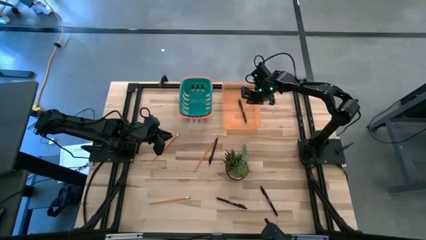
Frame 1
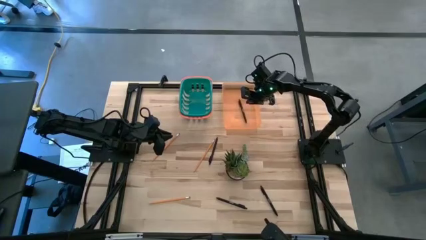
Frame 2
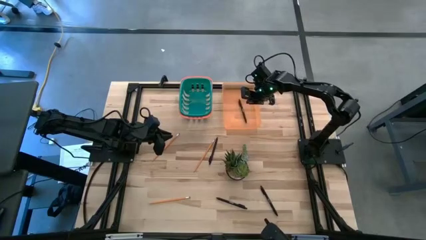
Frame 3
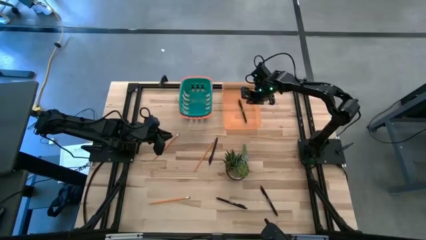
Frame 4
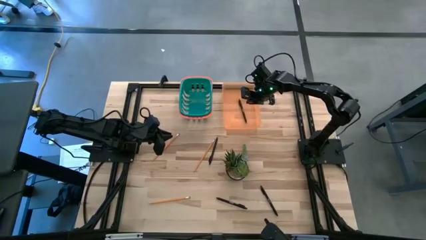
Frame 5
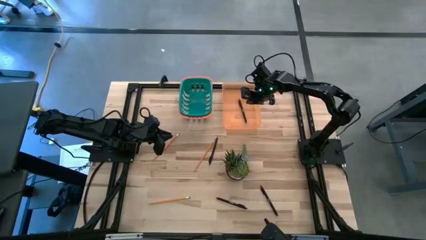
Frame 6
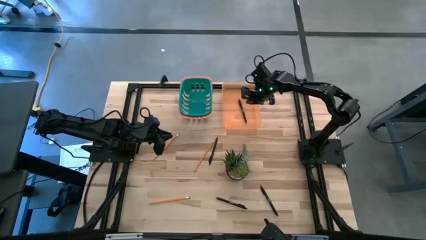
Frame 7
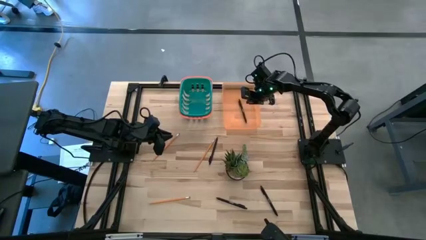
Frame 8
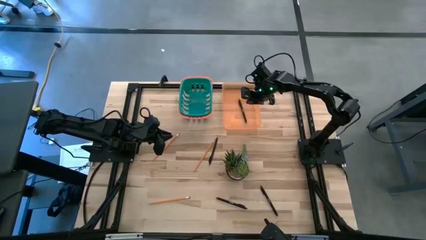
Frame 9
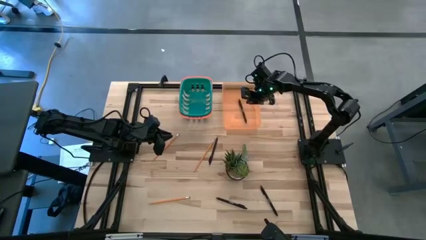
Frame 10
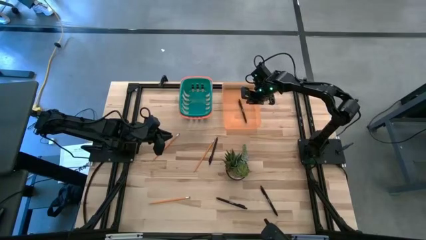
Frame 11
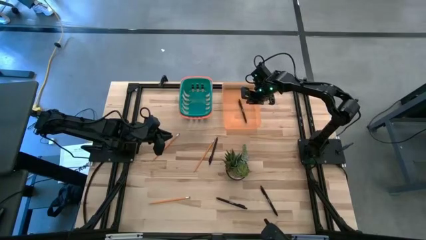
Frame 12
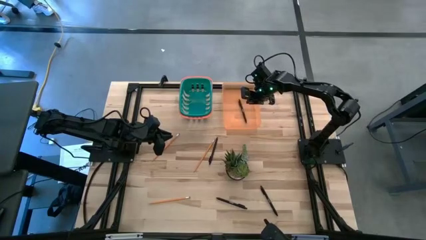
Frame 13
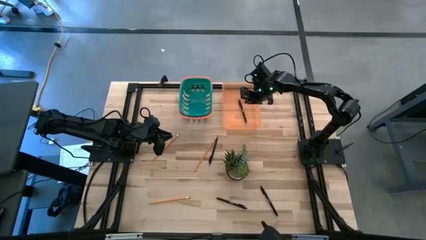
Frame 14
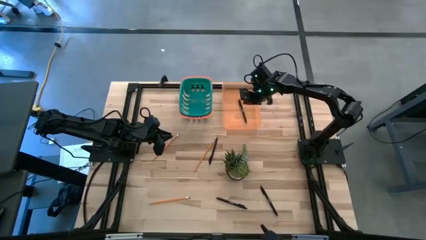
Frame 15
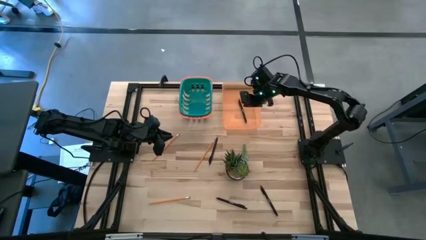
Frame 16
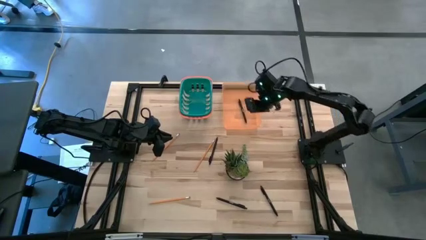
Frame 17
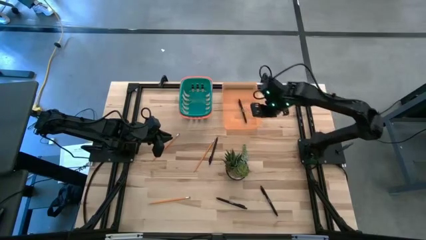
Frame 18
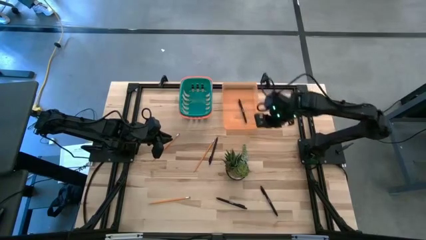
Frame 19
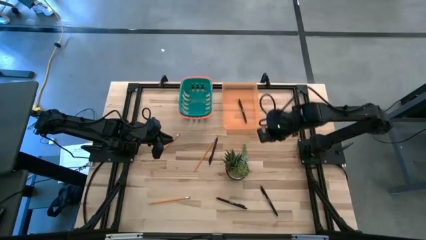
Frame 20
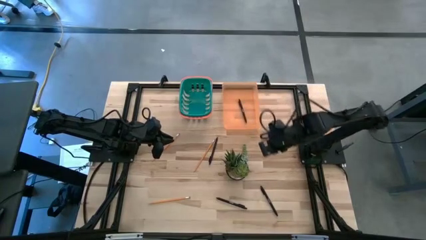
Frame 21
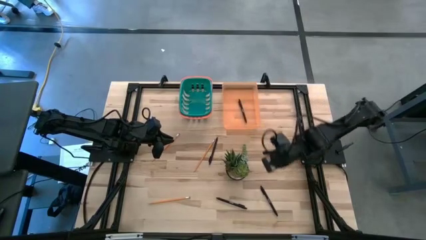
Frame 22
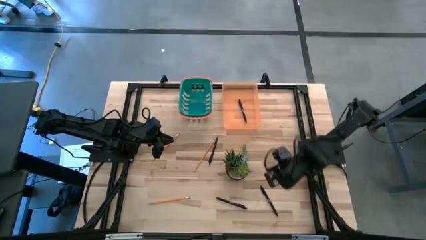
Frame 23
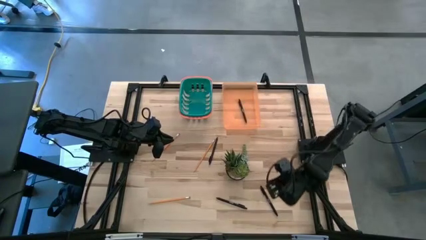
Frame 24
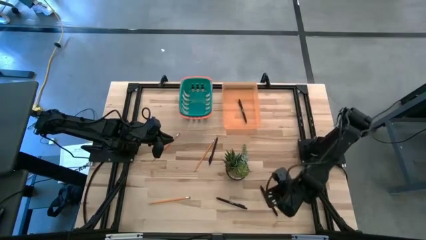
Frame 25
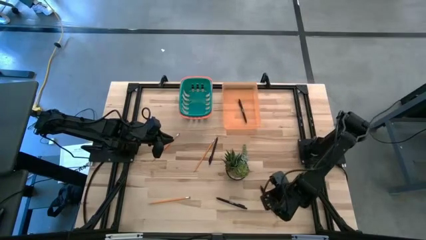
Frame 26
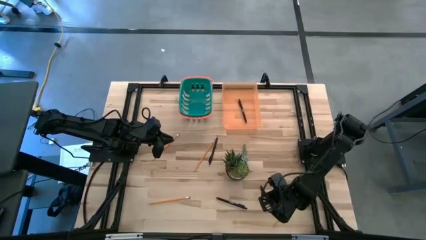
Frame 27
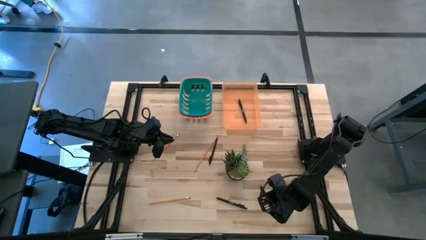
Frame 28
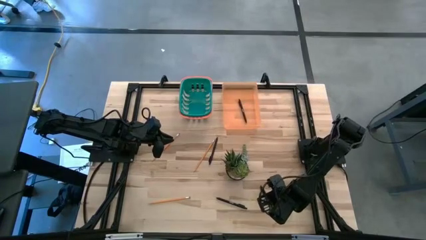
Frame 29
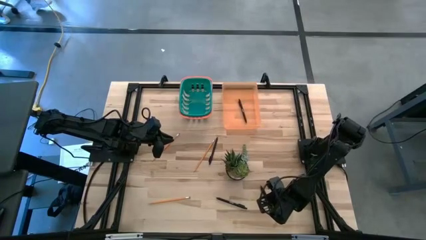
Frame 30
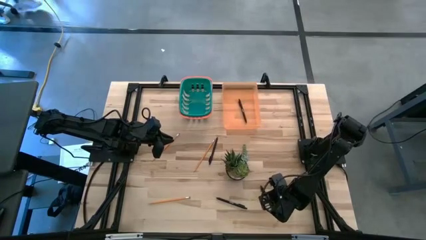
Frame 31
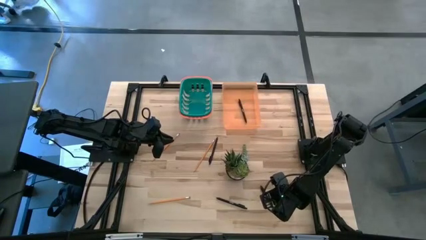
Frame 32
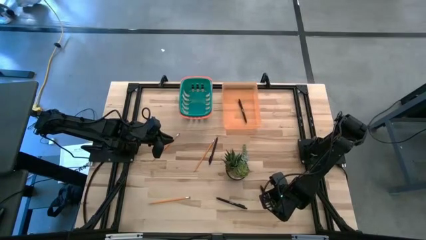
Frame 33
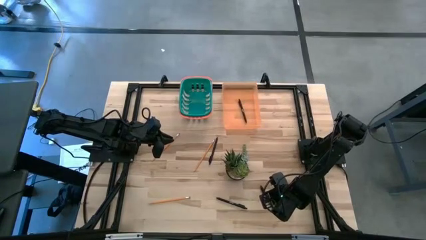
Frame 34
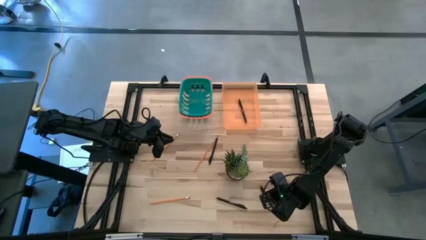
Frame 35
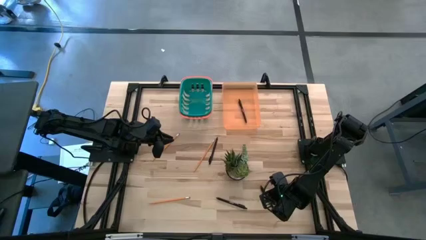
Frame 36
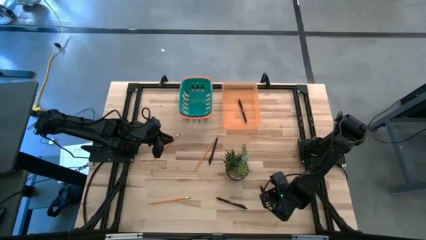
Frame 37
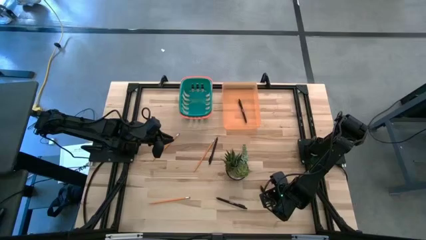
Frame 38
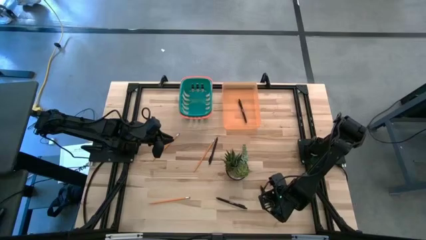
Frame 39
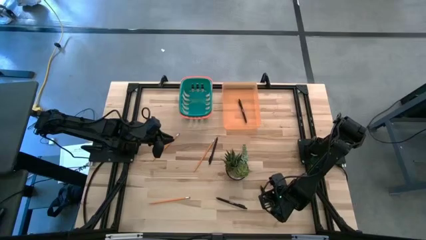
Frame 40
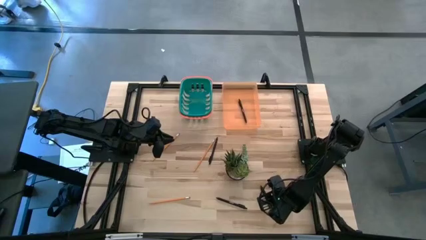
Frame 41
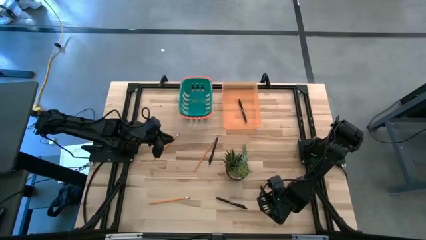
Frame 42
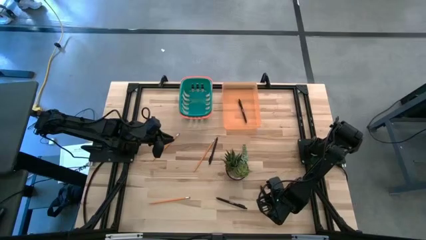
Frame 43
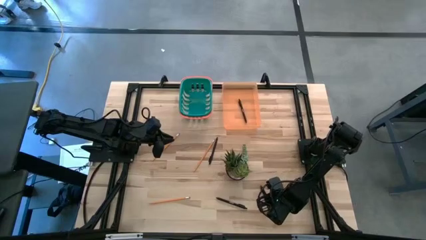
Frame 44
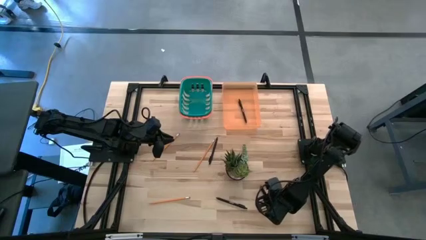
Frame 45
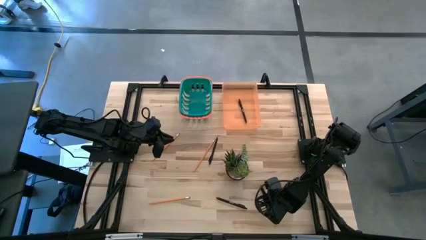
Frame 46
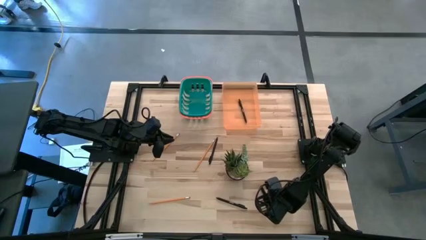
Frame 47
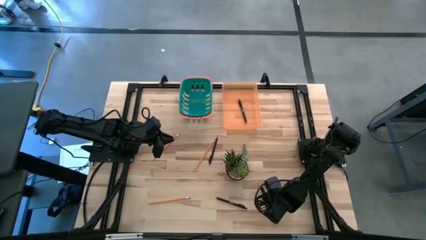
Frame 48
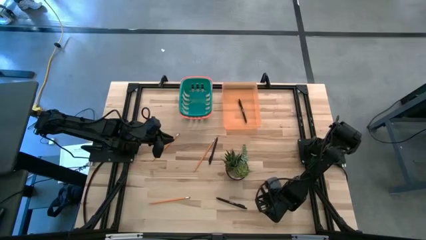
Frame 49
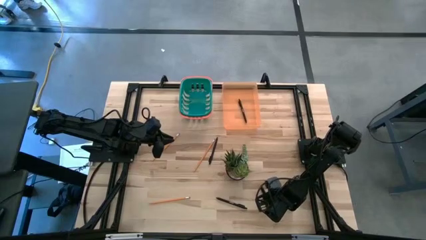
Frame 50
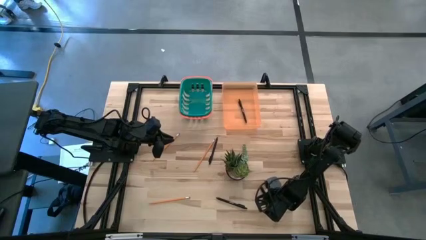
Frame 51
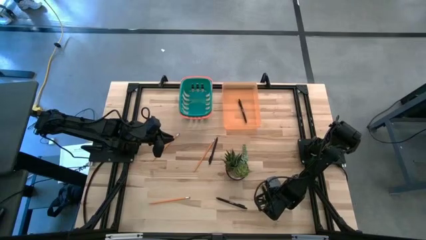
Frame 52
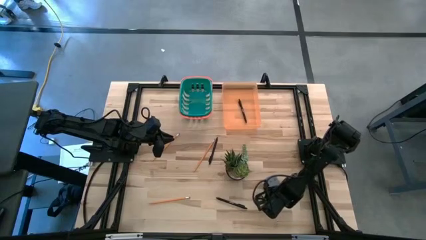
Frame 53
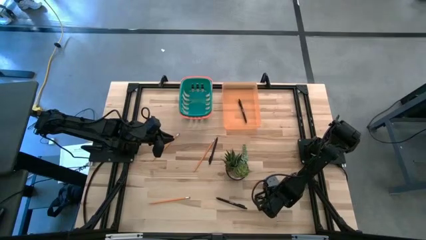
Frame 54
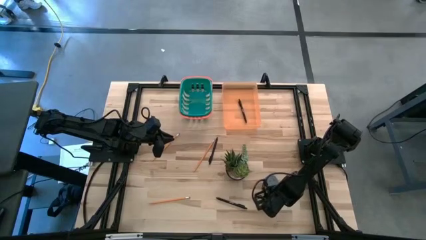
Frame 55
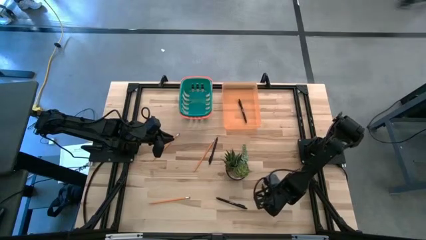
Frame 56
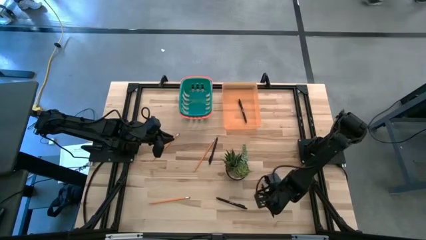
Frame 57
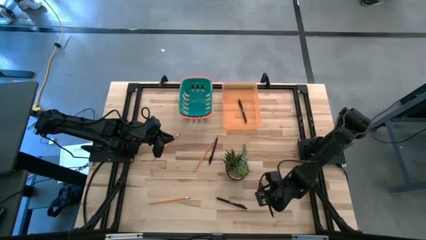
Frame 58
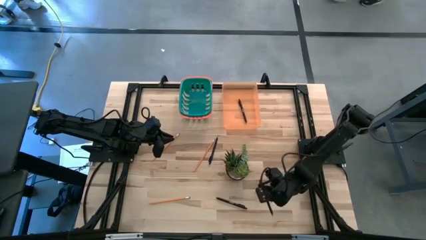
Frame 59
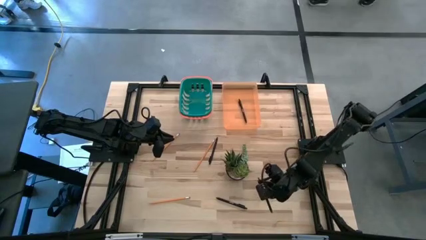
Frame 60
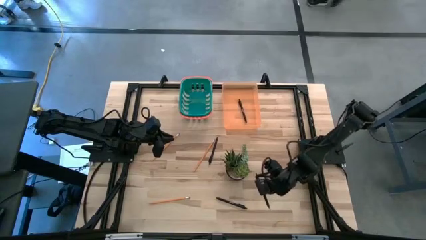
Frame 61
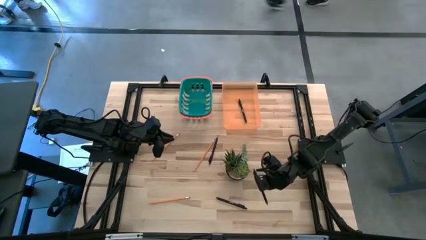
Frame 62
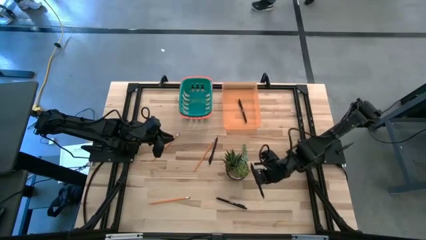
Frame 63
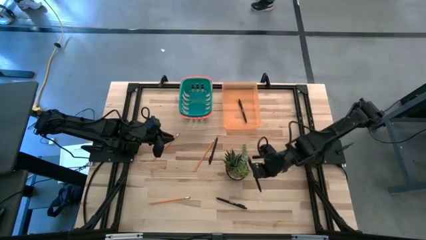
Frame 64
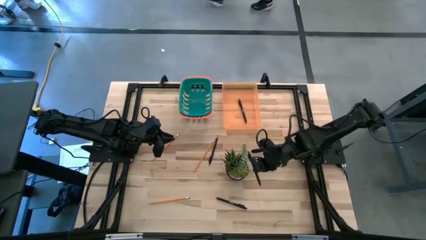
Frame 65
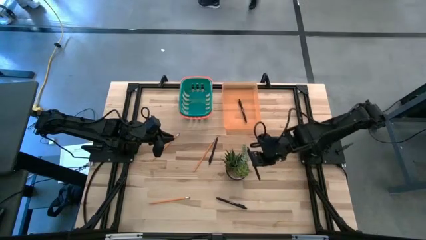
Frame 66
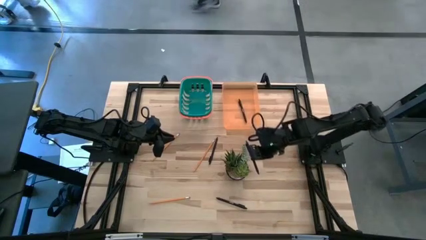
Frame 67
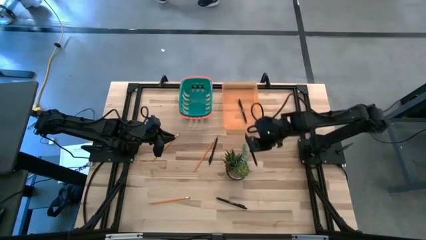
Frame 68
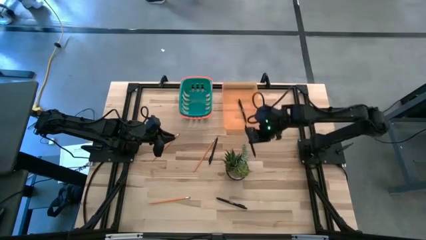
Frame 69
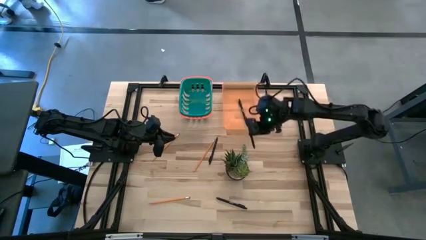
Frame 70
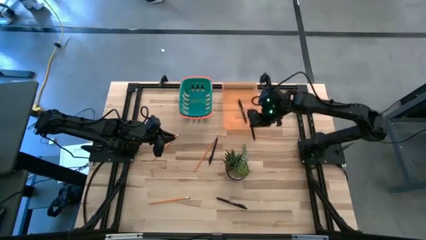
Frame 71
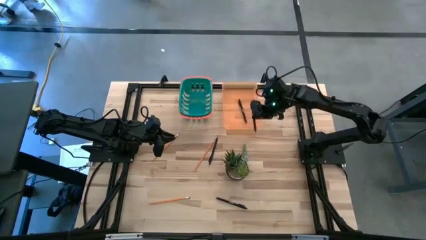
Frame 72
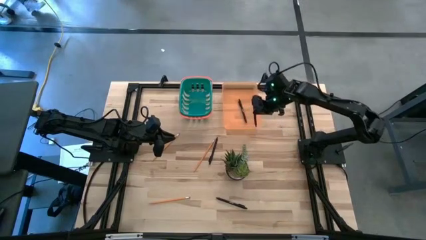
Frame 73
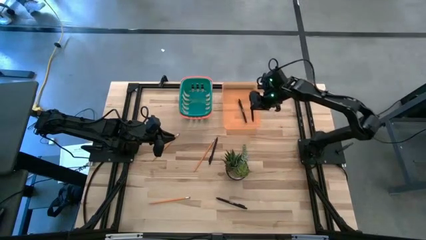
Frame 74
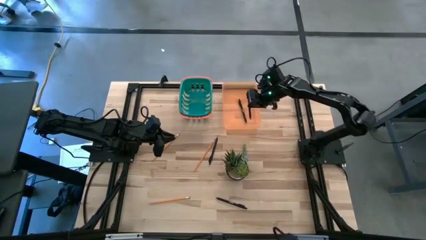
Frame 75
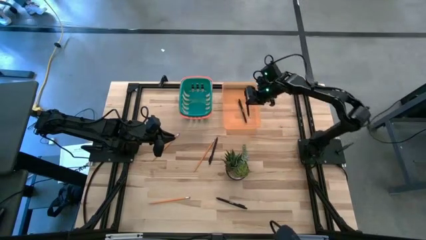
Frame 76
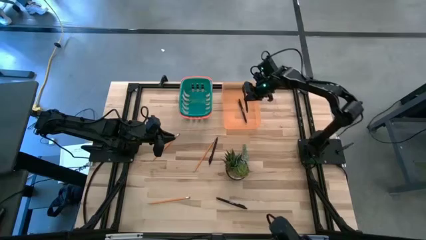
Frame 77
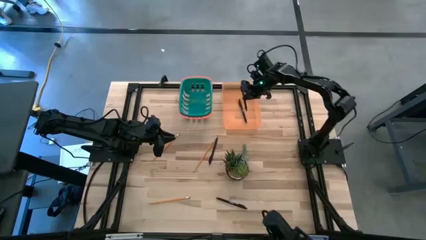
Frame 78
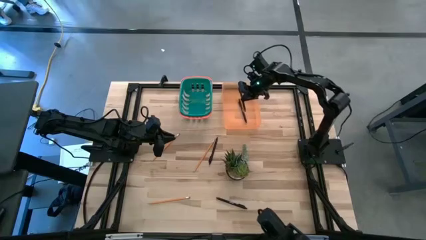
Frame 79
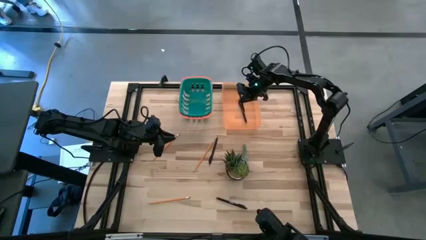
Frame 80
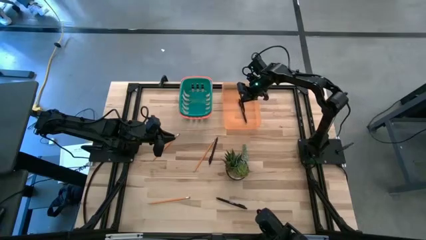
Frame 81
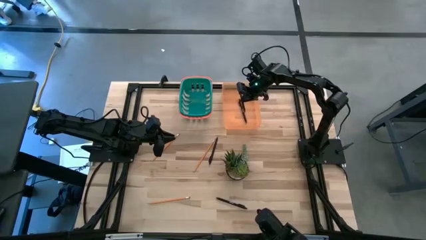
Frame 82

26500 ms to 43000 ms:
Task: Sort pens & pencils
Put the bottom right black ballpoint pen into the orange bin
